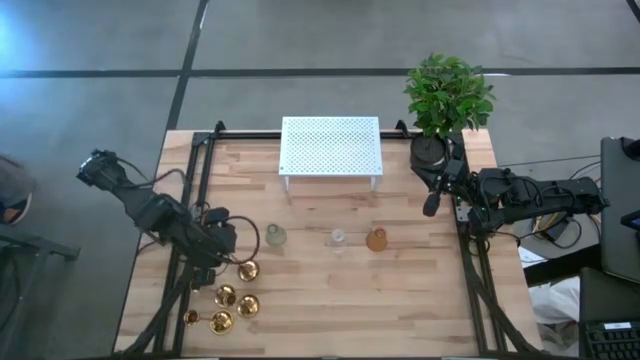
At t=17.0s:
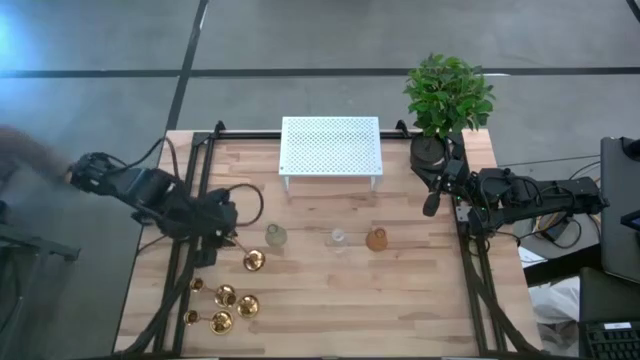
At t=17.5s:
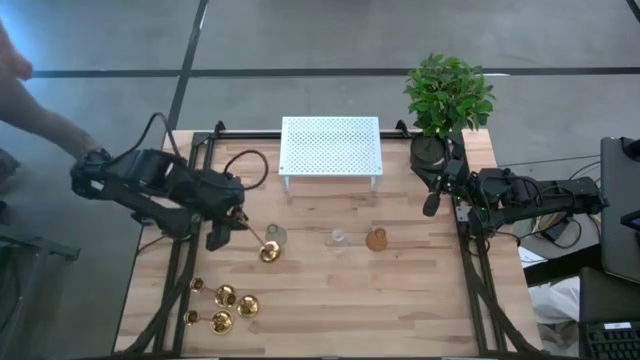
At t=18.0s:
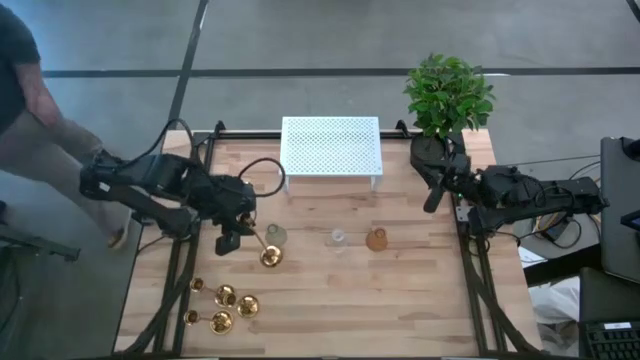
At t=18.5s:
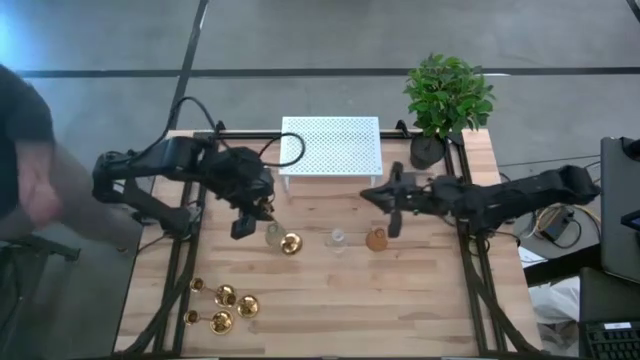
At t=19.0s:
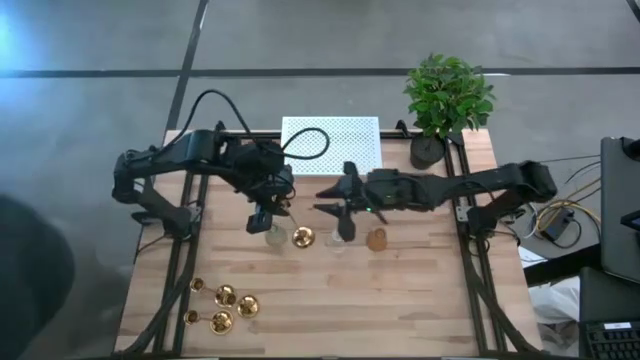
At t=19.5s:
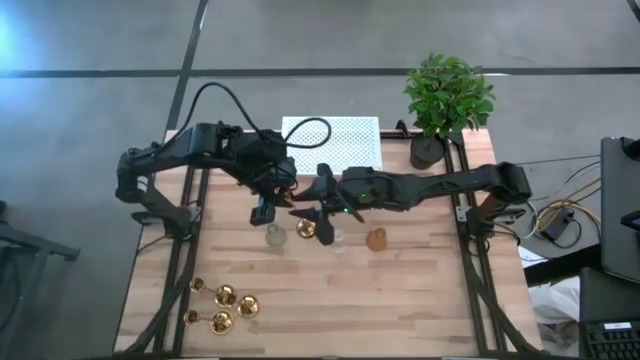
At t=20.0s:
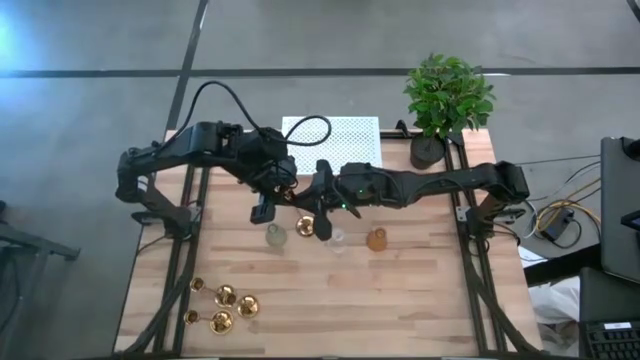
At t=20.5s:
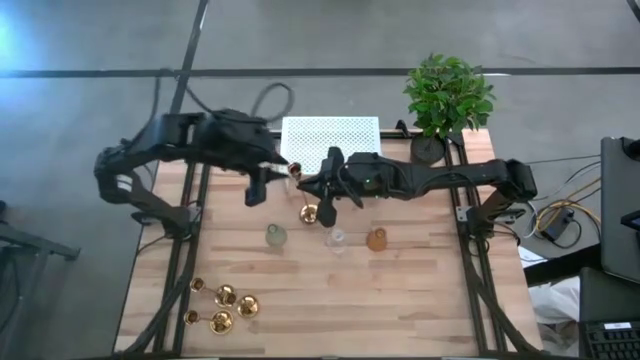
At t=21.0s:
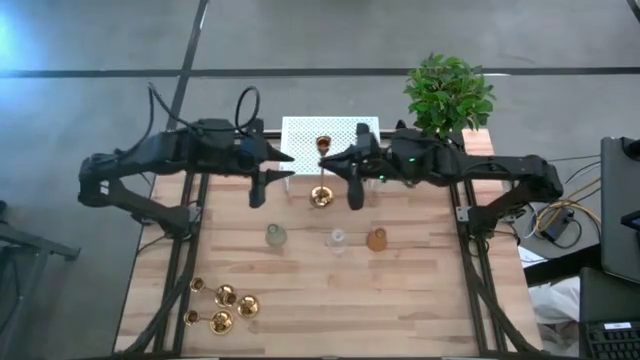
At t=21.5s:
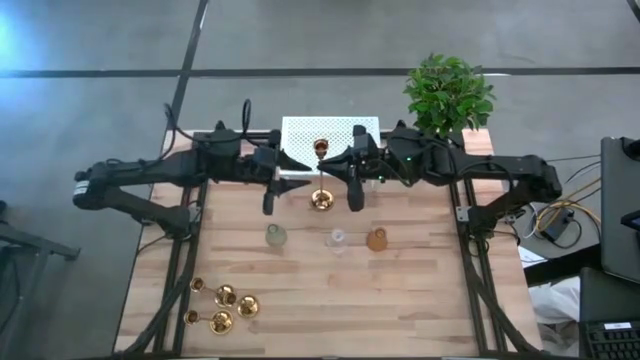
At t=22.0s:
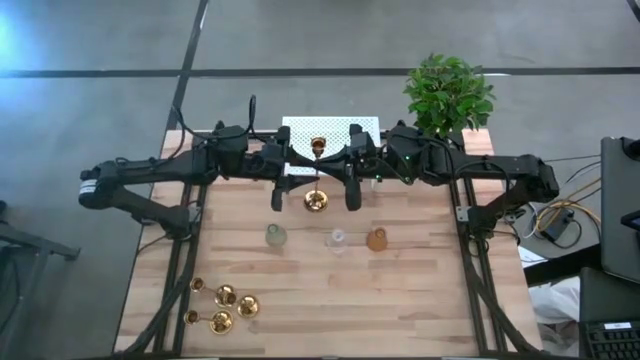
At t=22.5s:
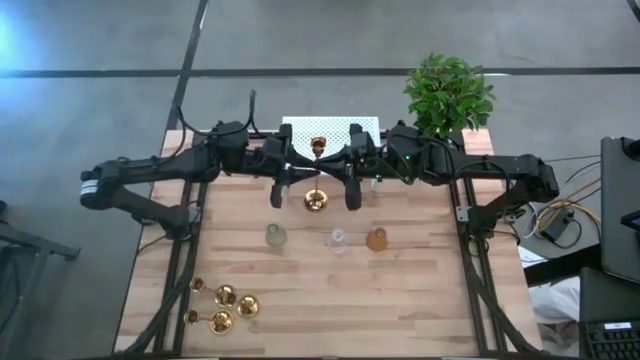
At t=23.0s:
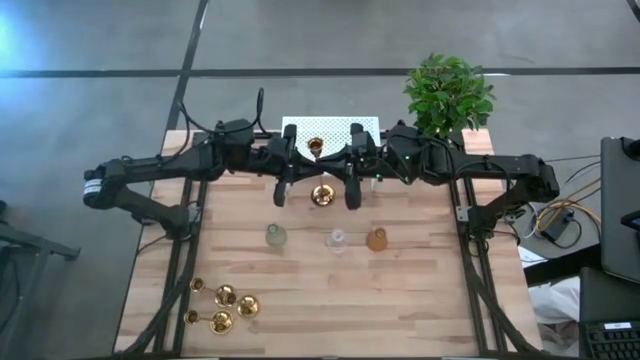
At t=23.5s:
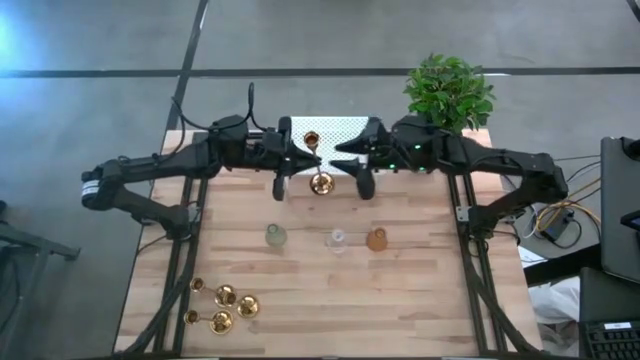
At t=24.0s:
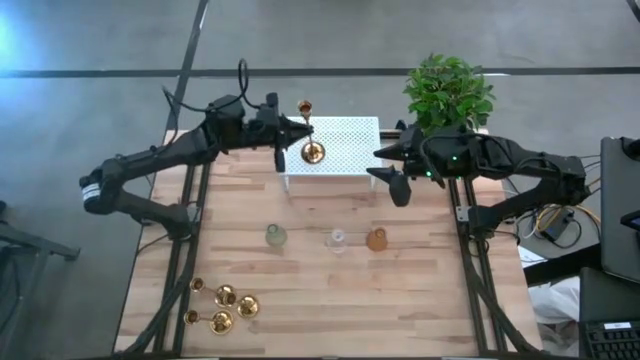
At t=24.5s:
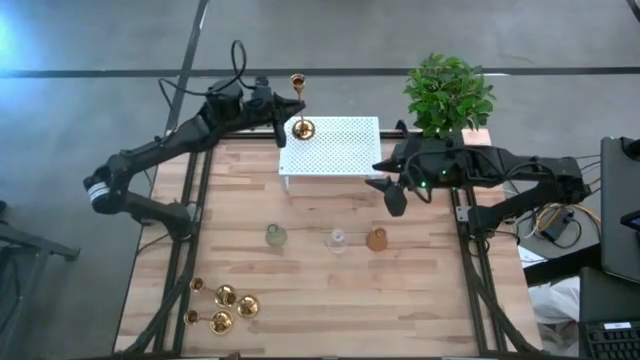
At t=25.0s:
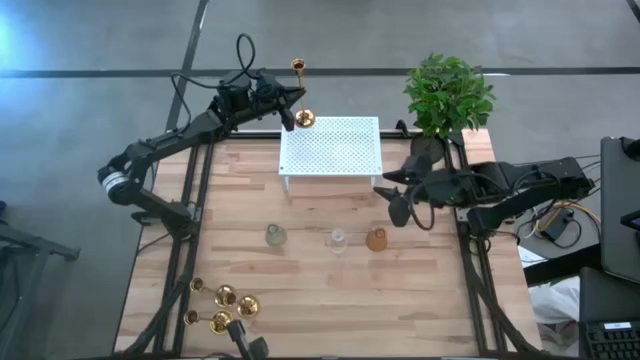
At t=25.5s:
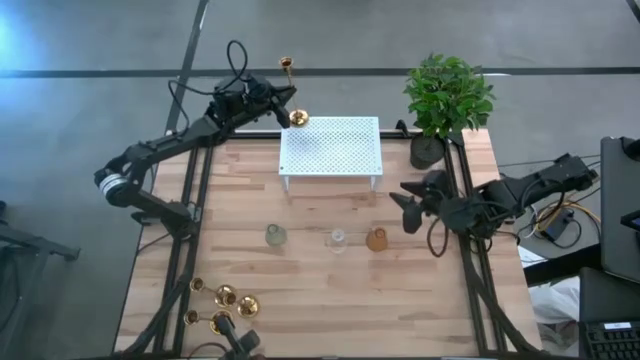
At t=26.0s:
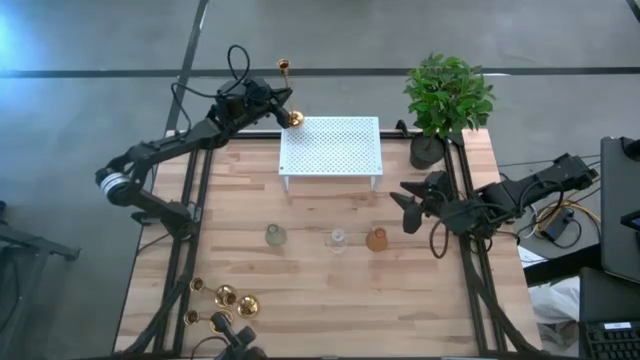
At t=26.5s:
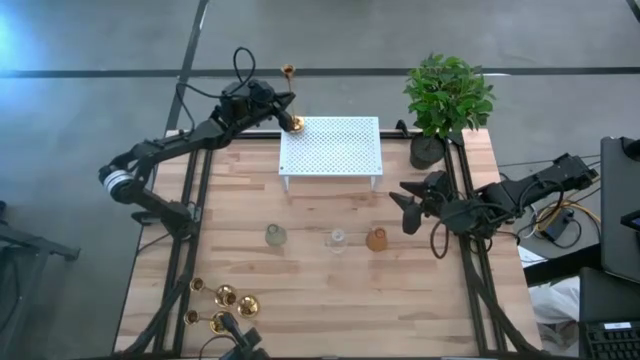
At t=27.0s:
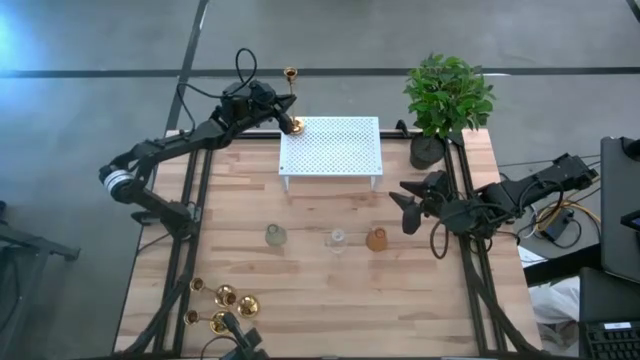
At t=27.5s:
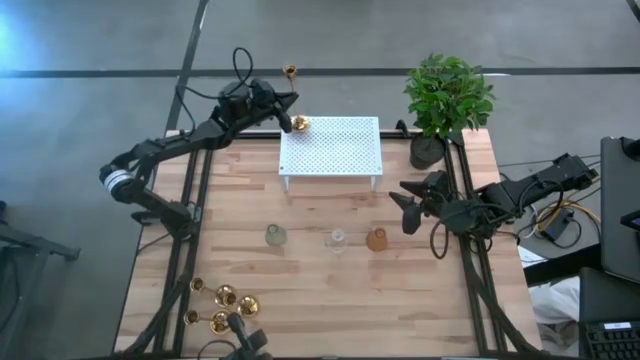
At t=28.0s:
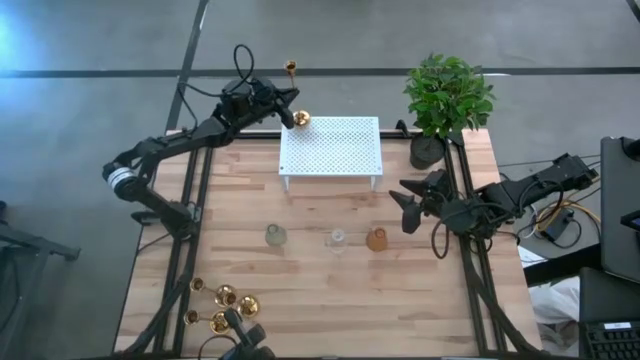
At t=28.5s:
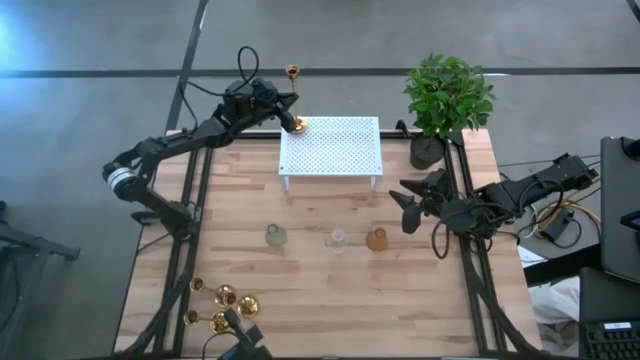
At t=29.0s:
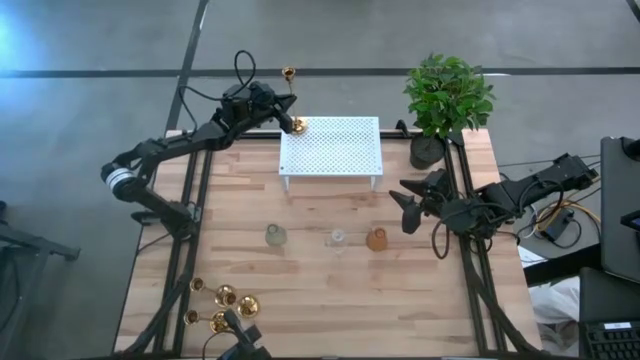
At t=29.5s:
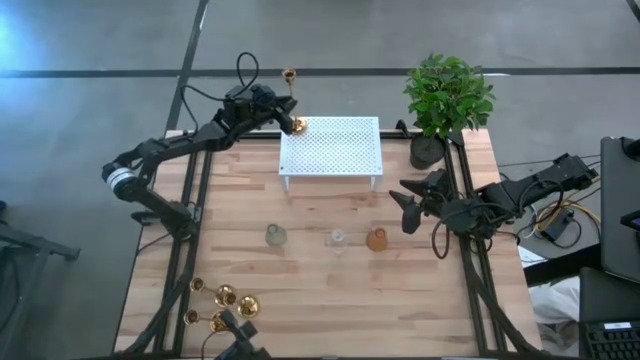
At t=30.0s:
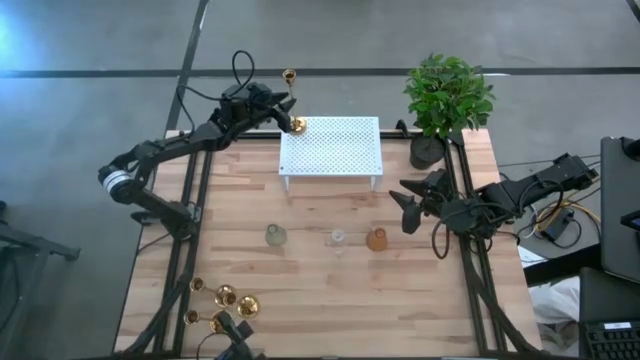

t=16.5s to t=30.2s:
Task: Pick & Place candle stick holders
Put the gold candle holder on the shelf

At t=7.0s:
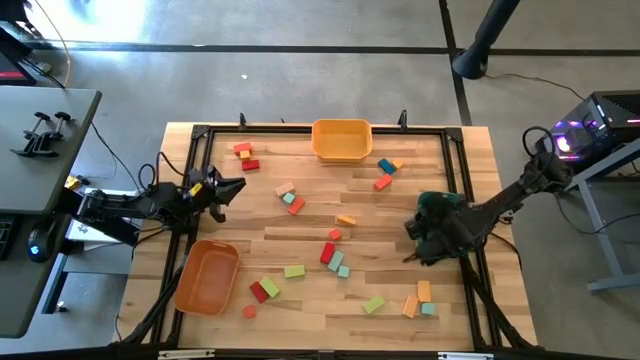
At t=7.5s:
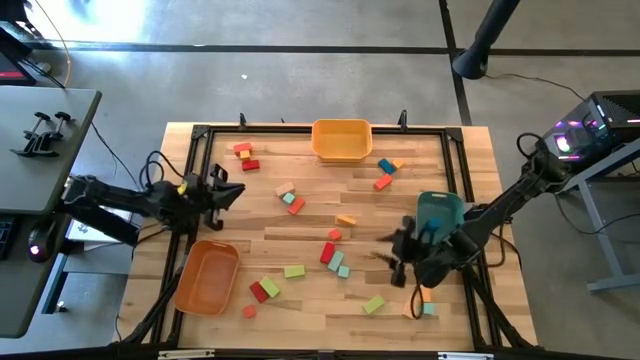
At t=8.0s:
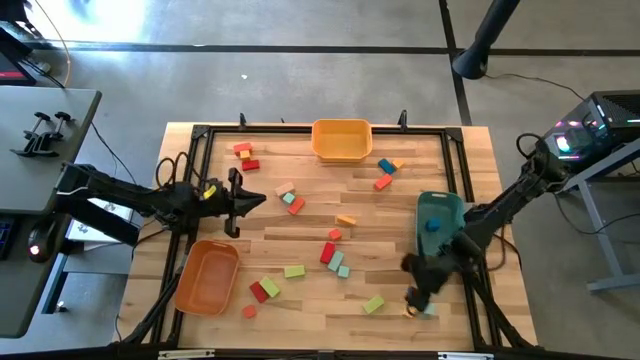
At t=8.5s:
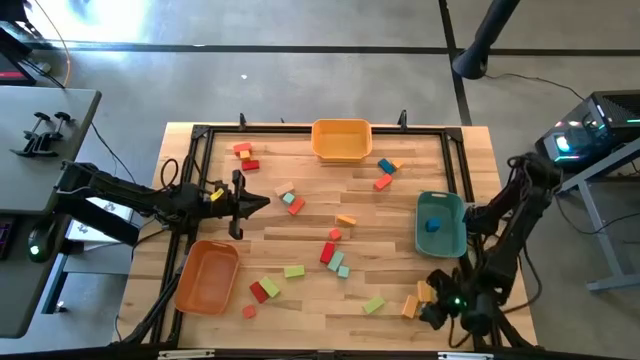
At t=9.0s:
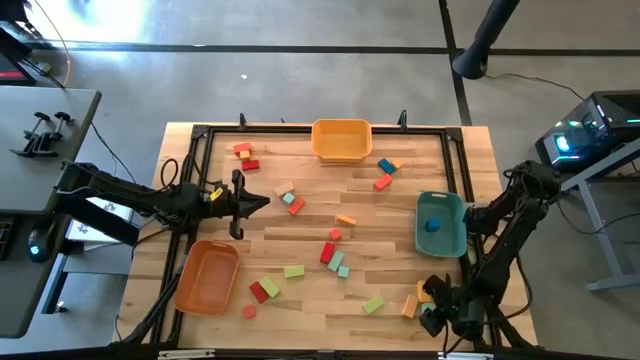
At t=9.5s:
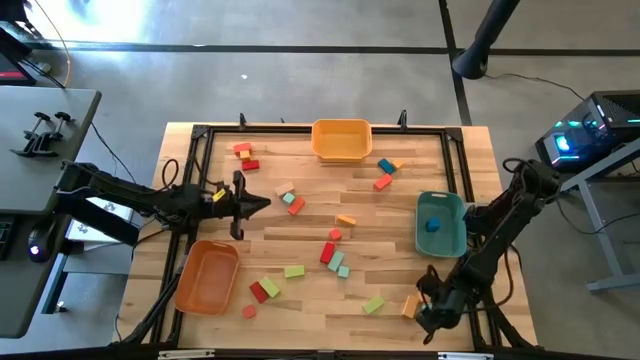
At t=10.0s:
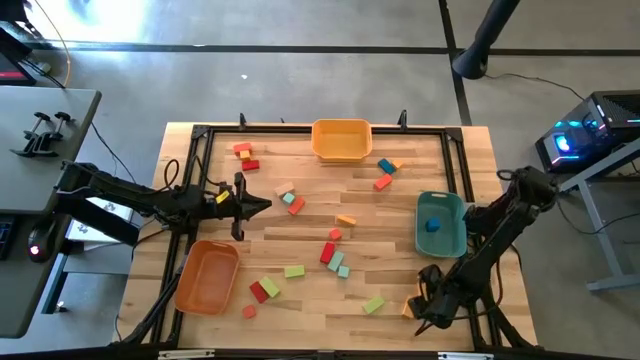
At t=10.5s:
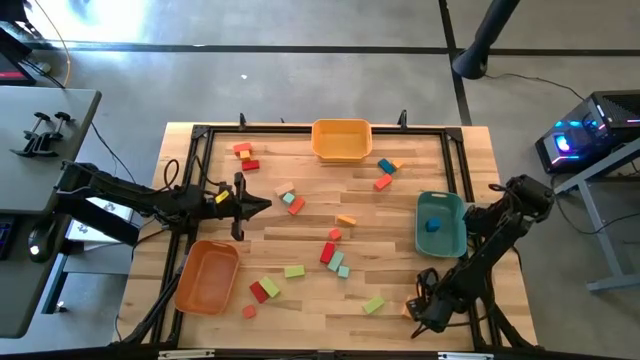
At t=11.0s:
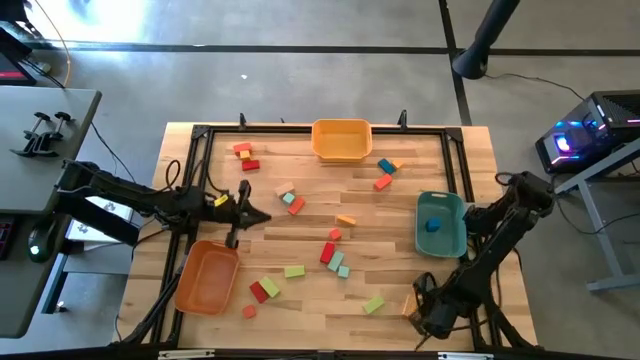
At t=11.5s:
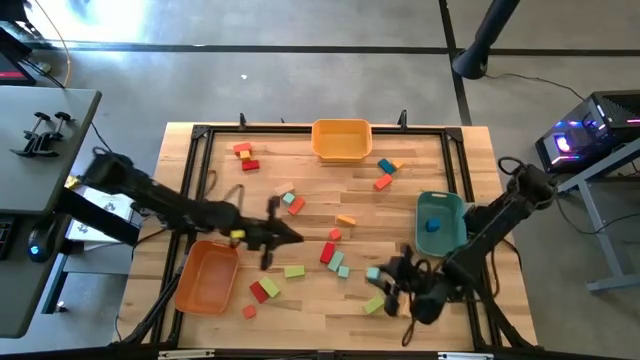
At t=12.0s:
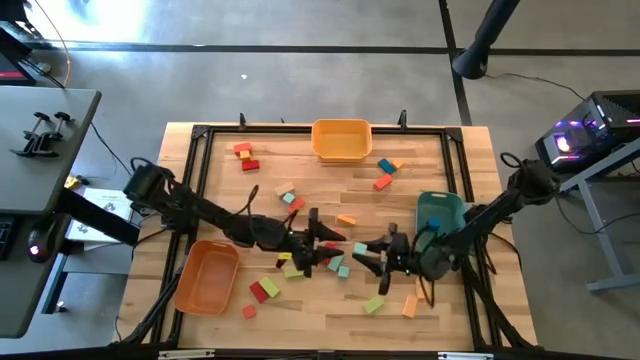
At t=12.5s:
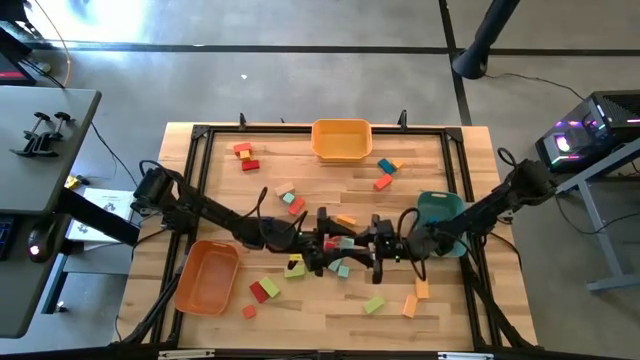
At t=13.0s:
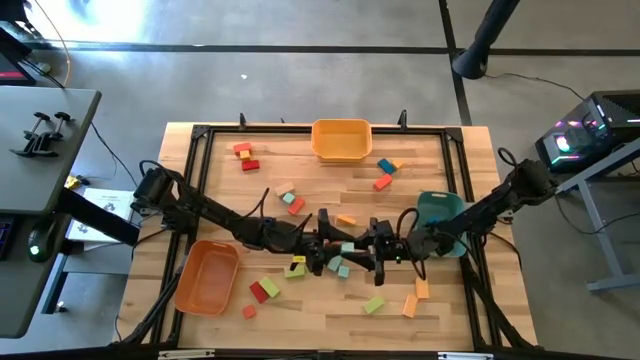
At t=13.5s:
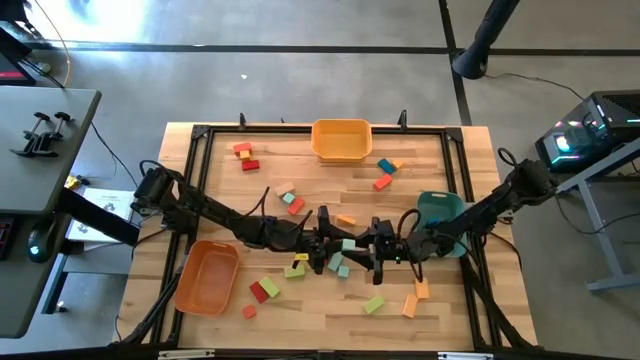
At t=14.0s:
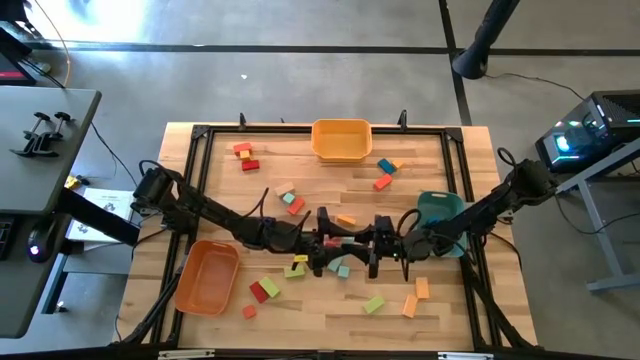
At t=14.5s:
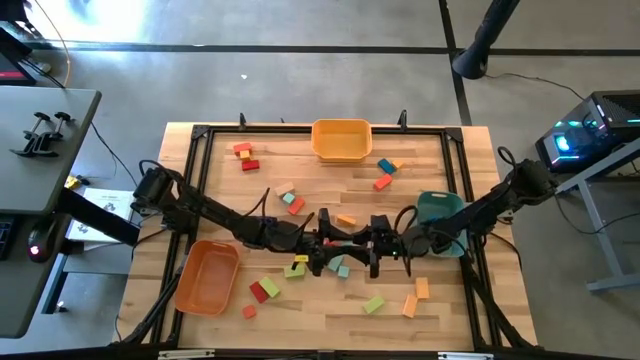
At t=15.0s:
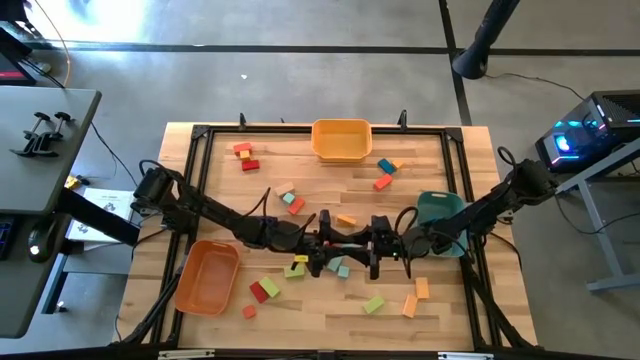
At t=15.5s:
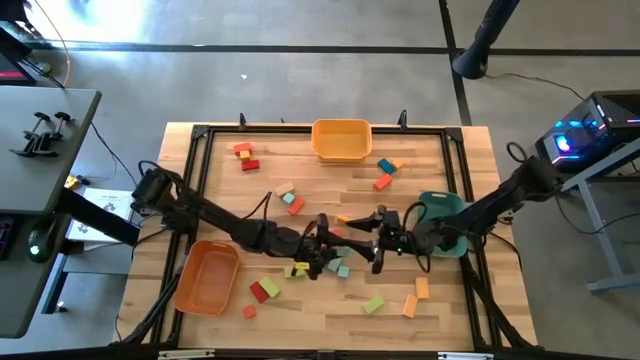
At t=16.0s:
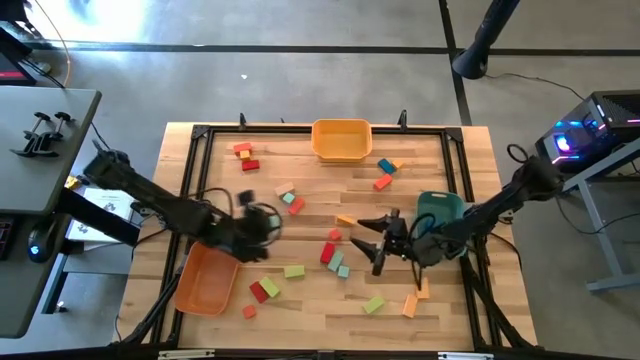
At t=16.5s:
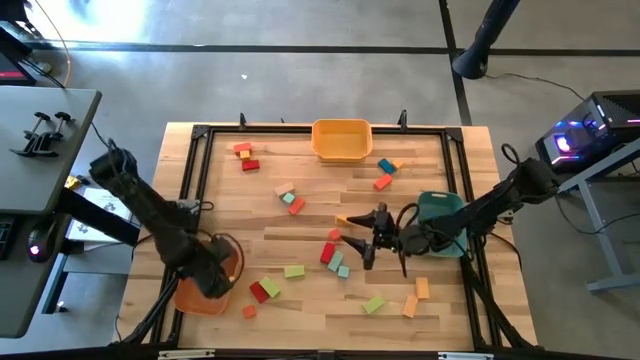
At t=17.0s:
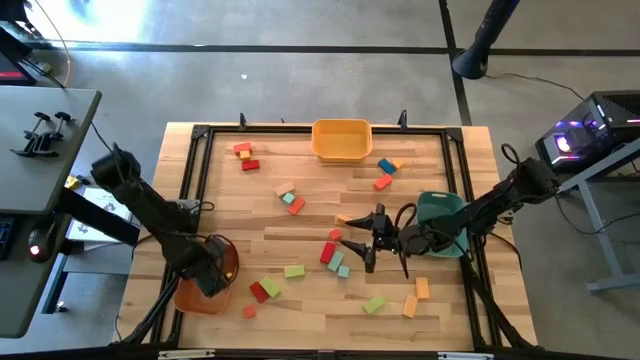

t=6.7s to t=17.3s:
Task: Sort blocks by size
Put the light blue square block into the orange bin
